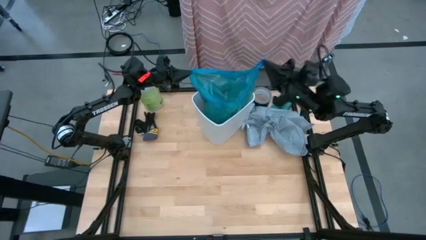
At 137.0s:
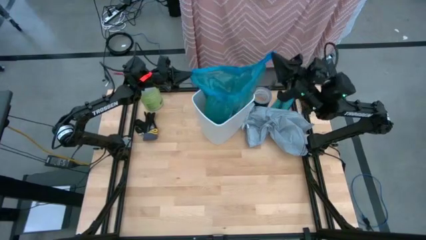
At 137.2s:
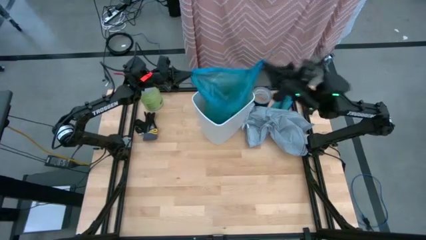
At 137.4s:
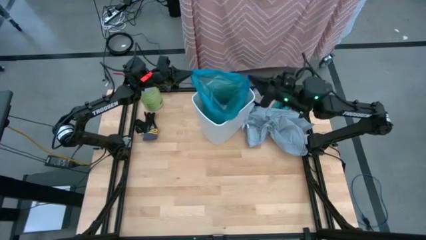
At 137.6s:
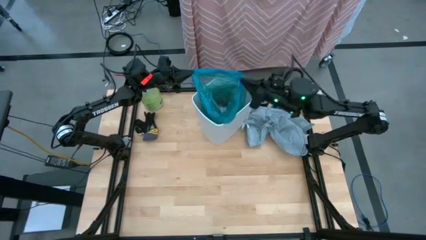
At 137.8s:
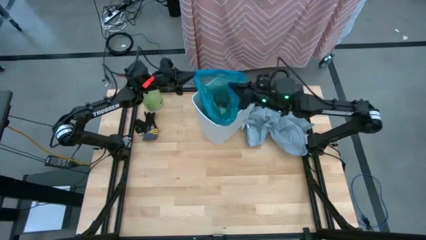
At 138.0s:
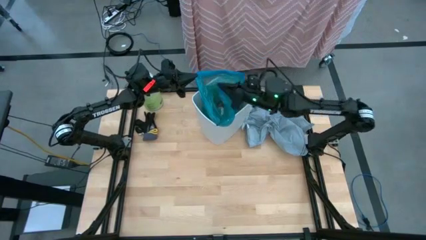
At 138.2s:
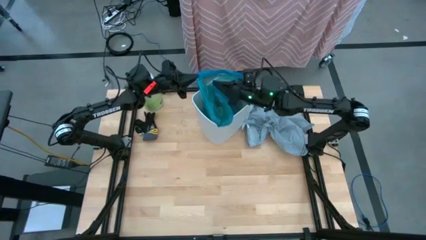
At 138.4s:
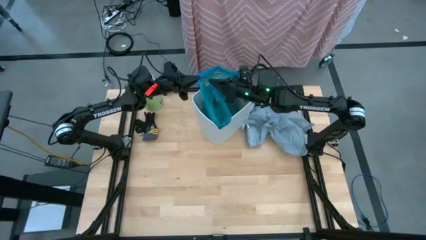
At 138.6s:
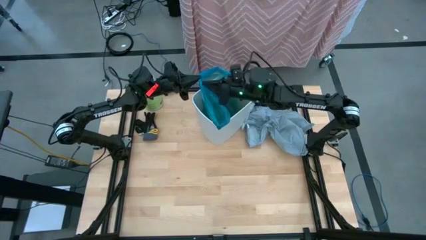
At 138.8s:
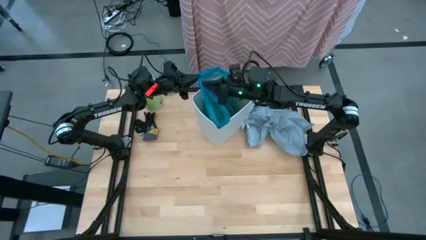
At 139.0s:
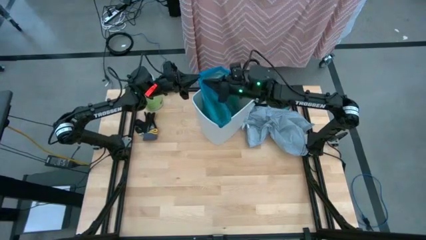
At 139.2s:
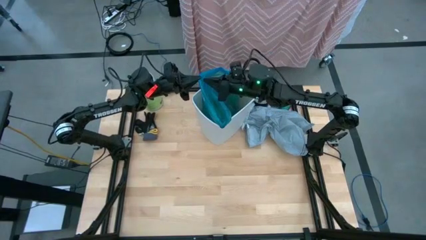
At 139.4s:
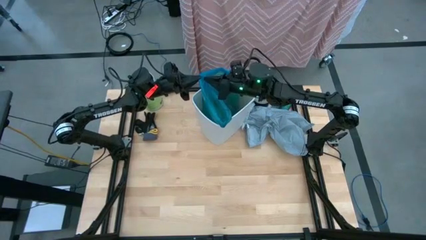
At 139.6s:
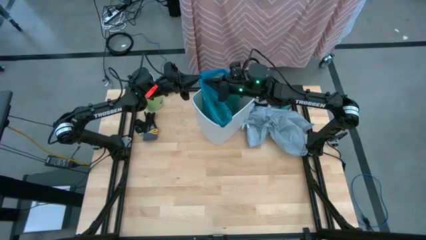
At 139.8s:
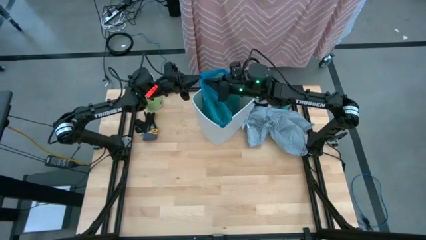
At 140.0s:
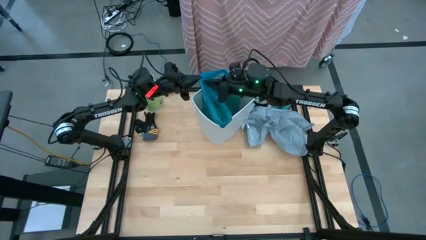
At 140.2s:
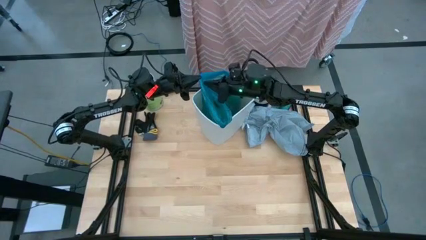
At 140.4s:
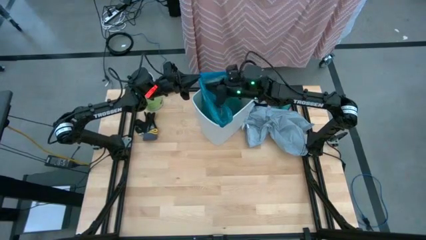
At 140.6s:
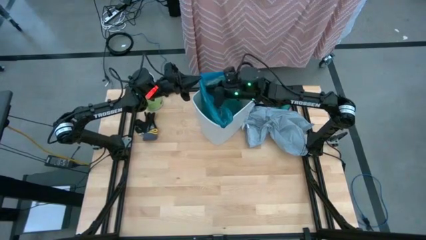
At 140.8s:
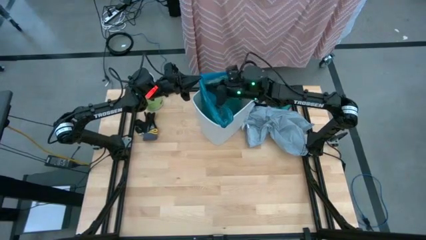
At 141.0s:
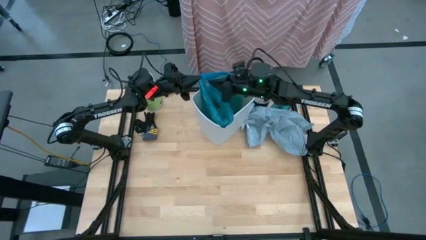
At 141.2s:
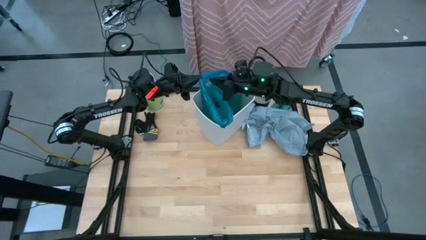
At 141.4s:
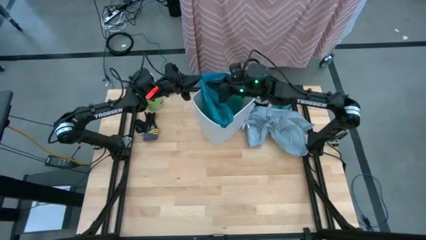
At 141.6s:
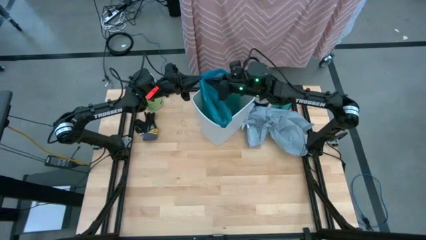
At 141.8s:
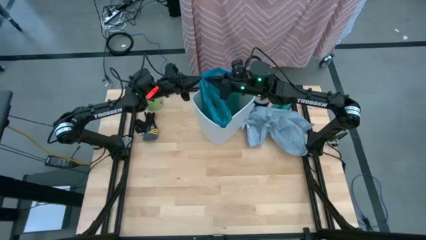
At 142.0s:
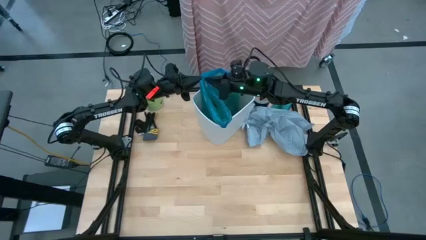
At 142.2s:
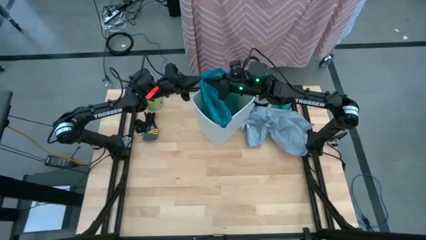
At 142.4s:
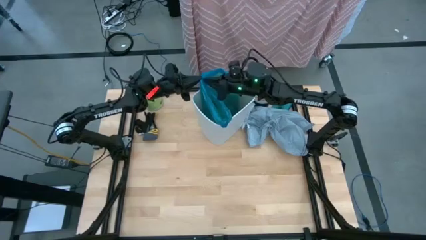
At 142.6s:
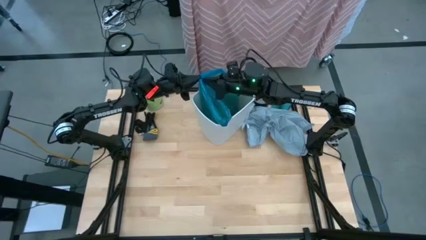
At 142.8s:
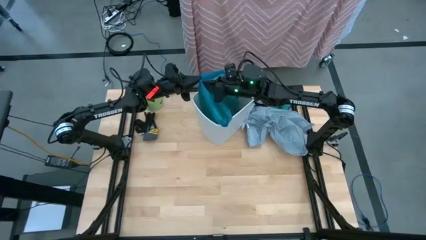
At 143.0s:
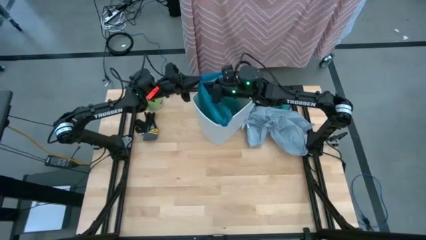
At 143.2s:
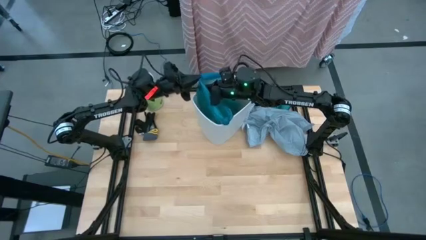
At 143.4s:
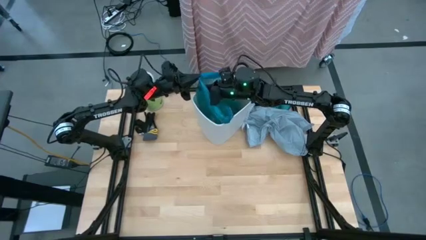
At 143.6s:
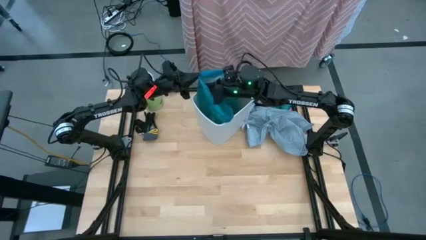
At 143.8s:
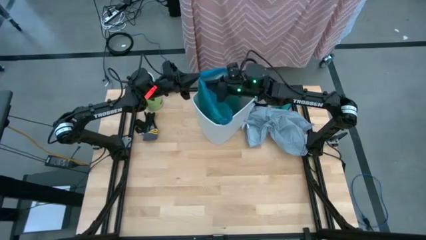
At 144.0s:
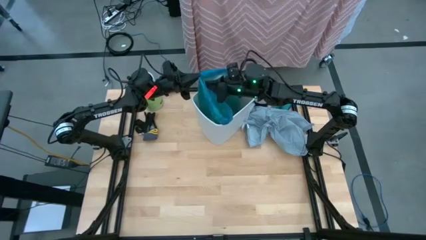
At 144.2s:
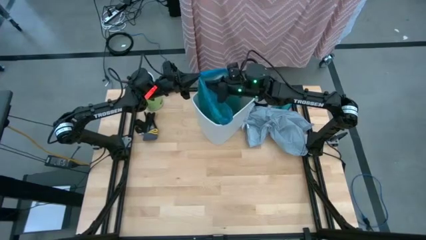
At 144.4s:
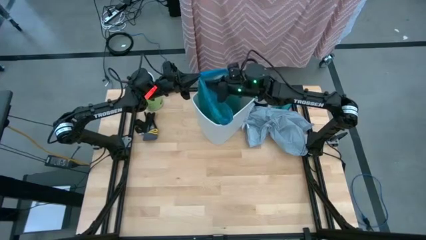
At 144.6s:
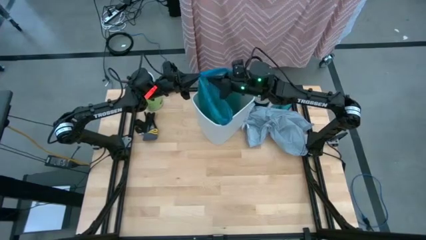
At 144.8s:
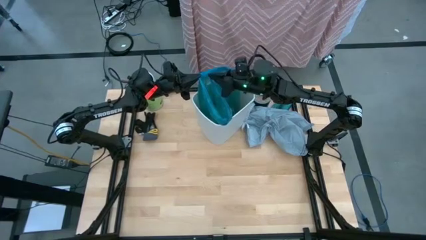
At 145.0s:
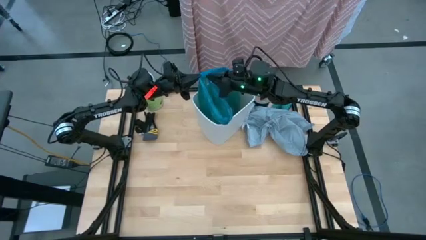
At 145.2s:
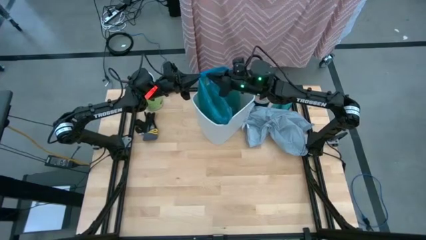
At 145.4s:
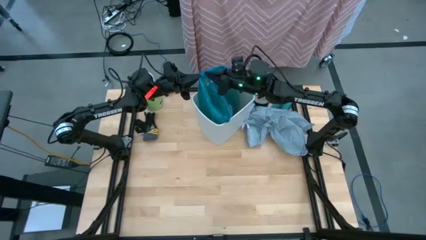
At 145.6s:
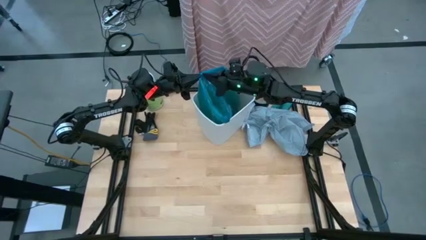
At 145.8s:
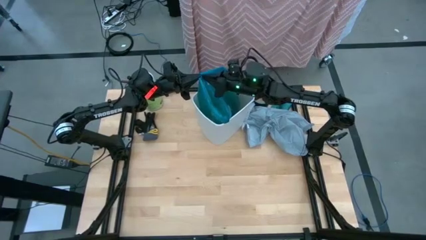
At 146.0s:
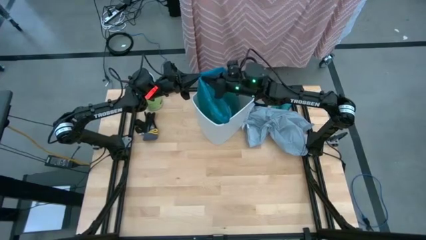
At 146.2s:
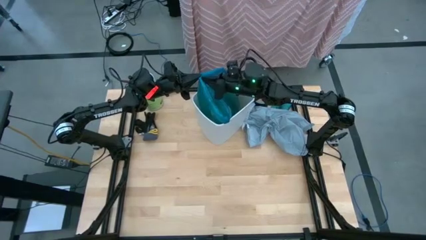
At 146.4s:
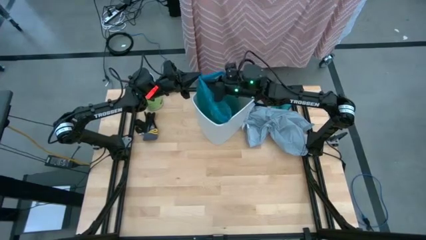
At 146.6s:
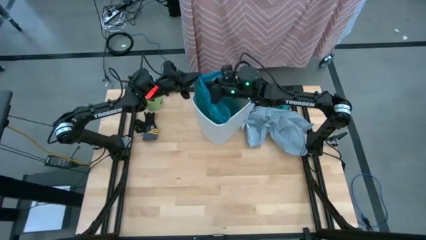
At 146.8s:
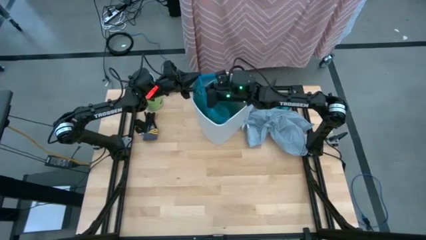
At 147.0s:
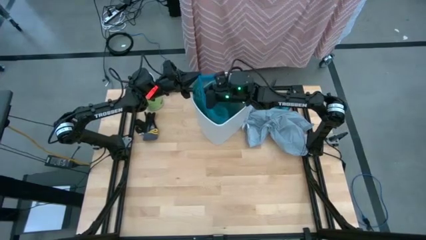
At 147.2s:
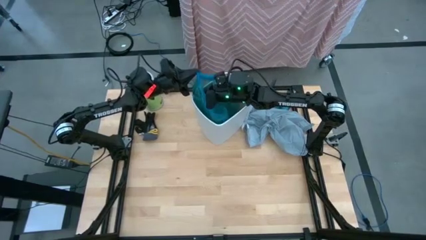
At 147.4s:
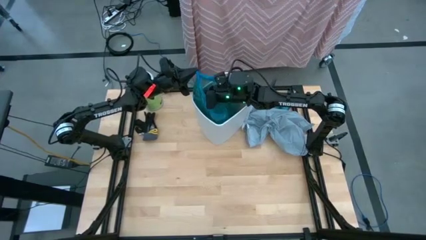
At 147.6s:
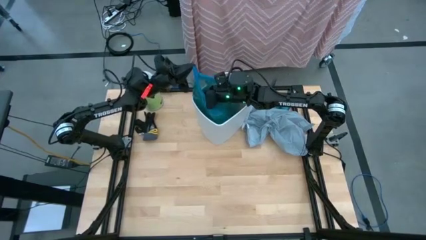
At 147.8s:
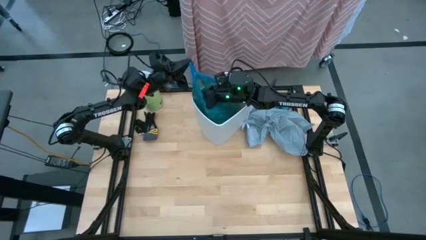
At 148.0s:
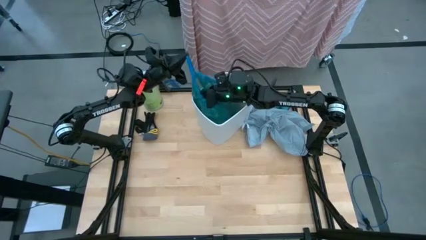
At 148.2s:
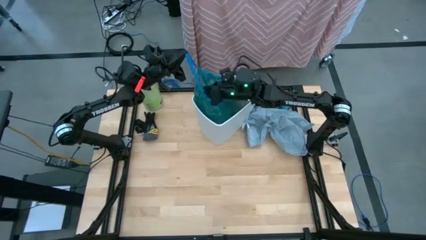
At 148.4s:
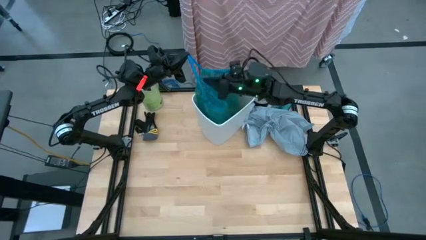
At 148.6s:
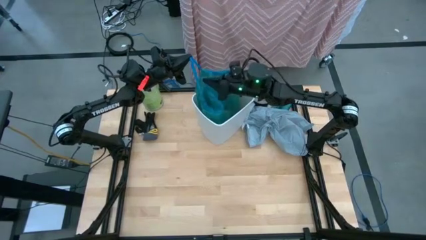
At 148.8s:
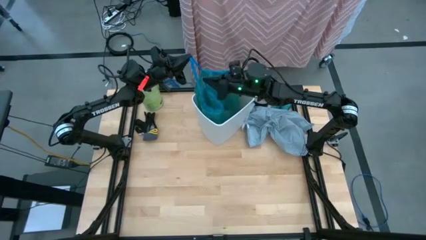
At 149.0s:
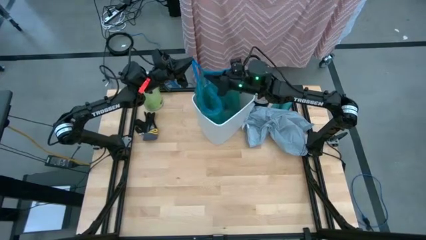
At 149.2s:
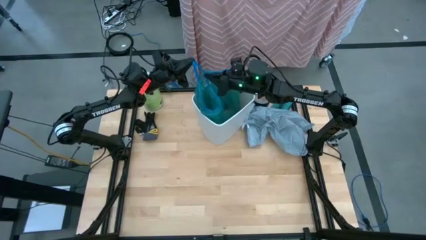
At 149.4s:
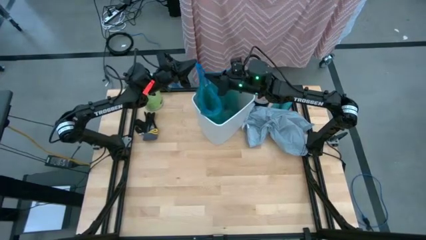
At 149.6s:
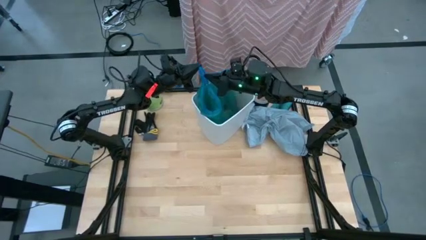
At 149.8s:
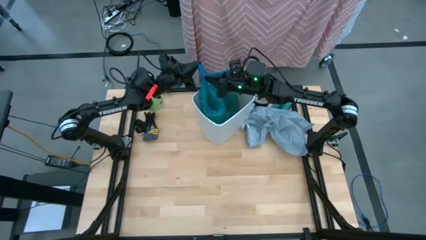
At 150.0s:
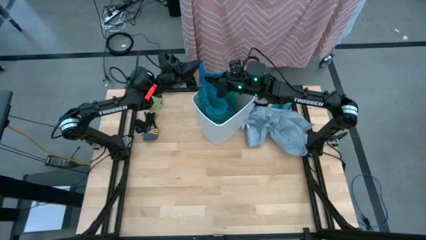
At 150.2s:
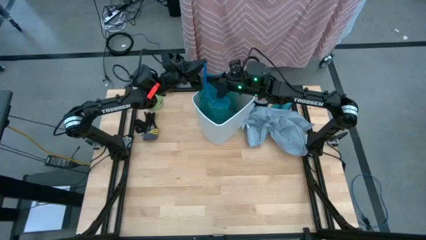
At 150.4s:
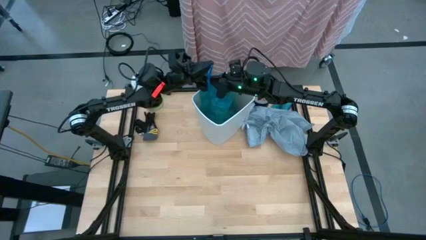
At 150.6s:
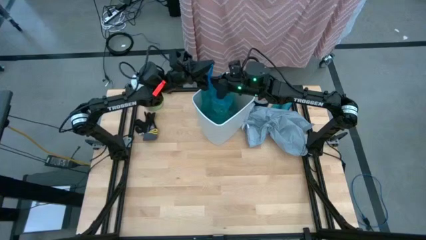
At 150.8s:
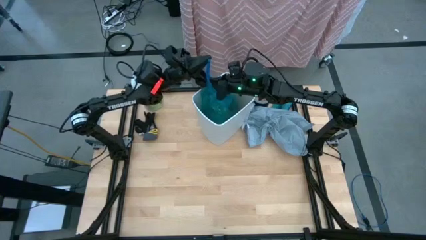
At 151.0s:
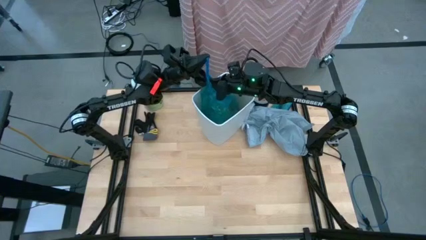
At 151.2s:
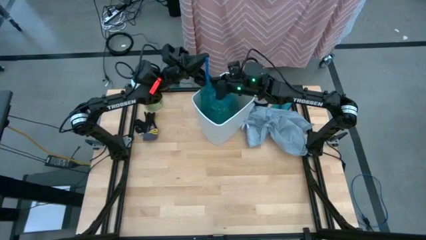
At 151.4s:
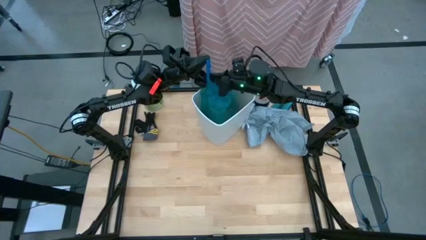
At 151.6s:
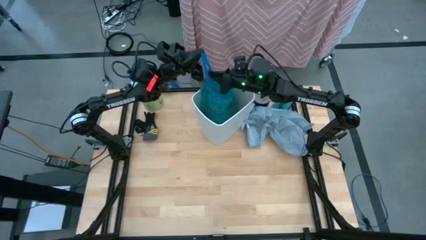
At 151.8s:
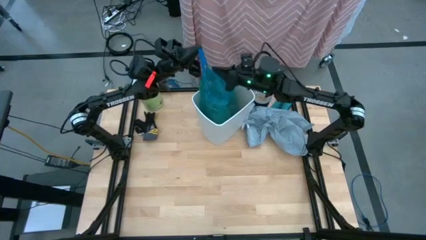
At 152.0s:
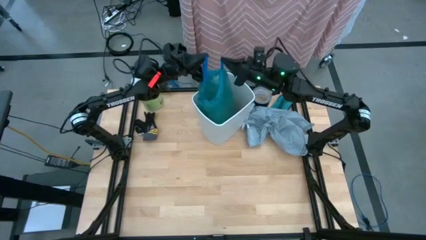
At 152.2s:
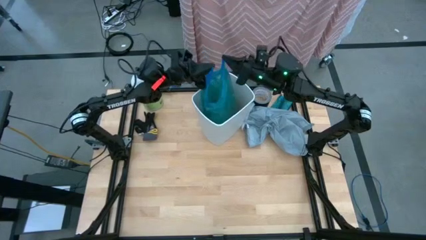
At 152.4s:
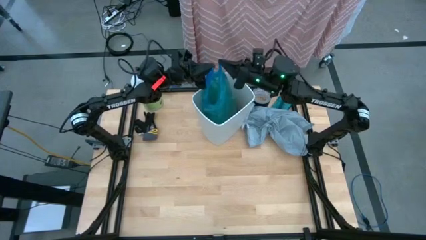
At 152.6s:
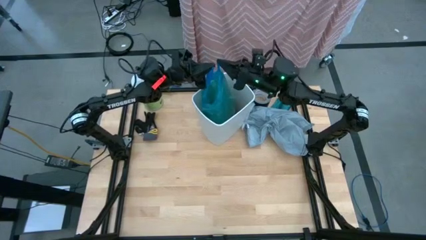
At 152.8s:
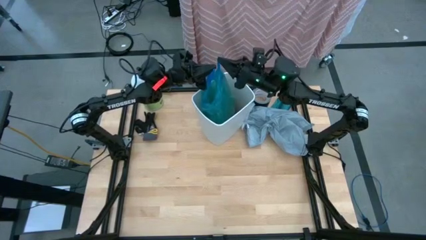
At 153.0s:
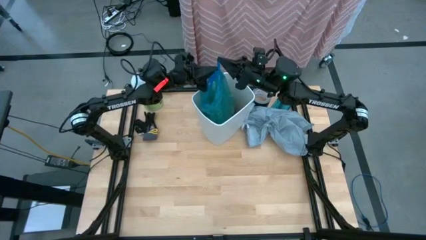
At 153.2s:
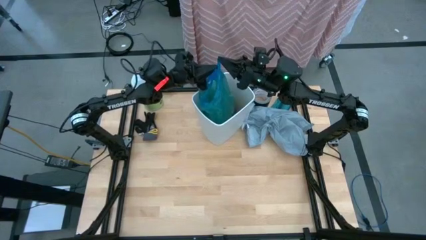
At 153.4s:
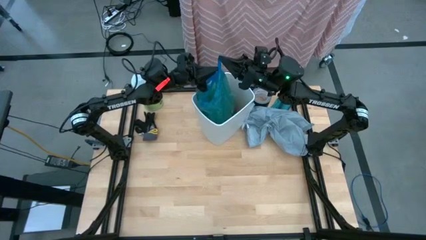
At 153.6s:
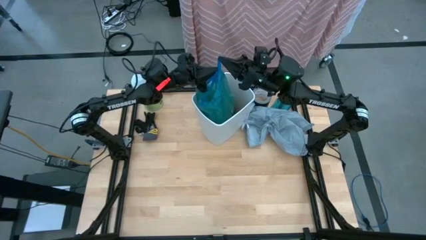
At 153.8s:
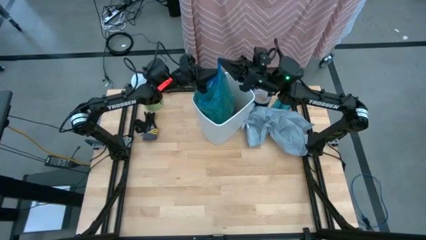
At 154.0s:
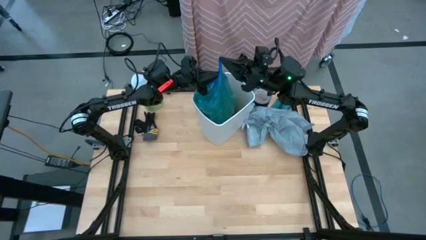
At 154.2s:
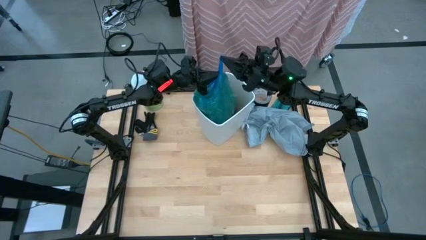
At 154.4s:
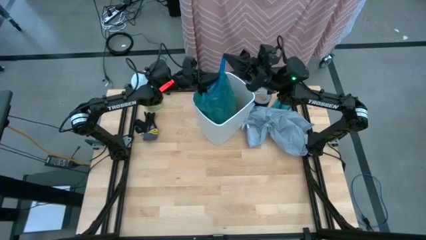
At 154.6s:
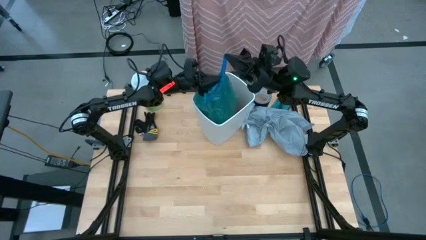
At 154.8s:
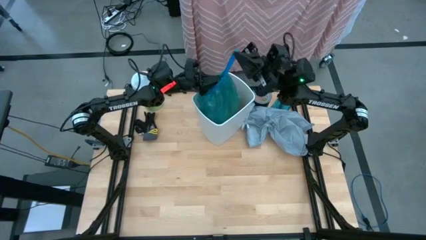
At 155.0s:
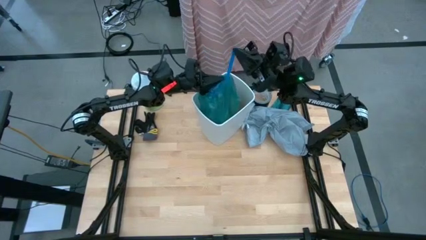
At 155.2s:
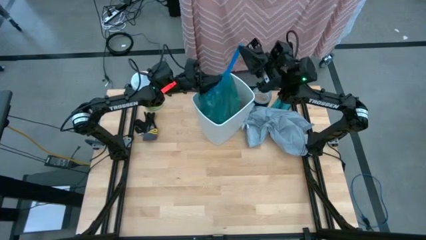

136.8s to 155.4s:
Task: place trash/remove bag and relplace
Close the trash bag
